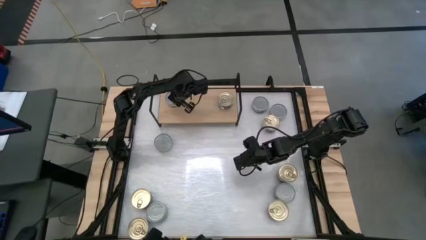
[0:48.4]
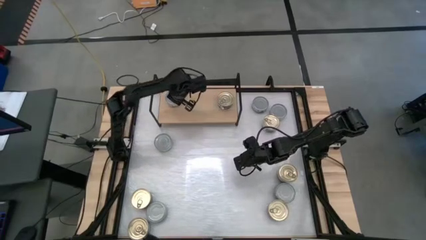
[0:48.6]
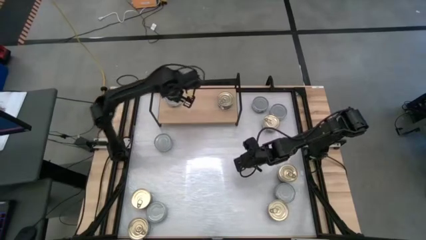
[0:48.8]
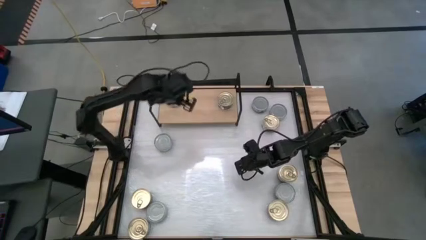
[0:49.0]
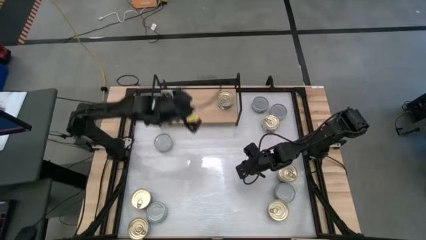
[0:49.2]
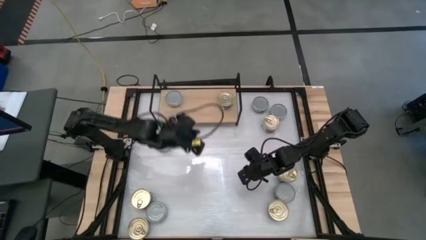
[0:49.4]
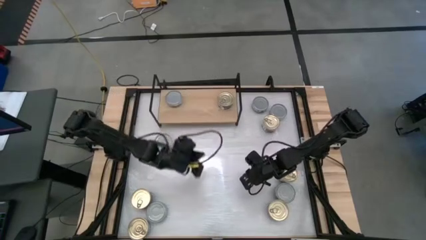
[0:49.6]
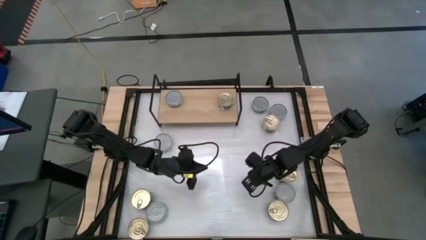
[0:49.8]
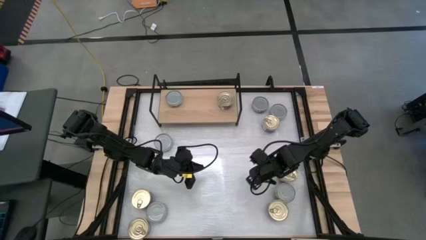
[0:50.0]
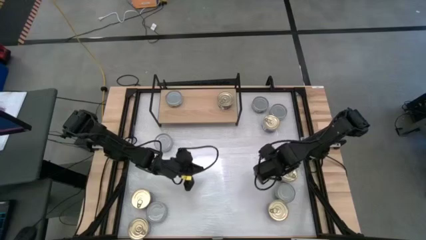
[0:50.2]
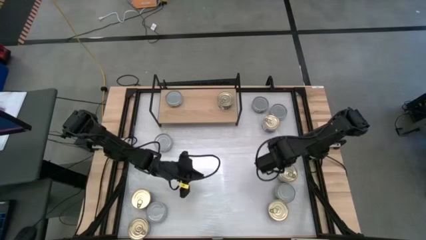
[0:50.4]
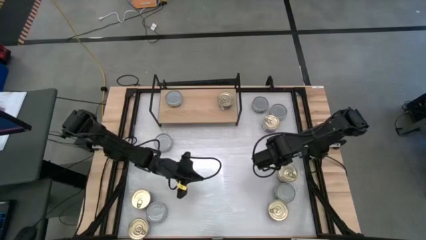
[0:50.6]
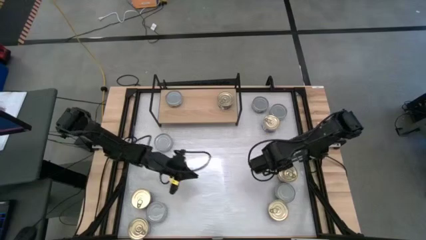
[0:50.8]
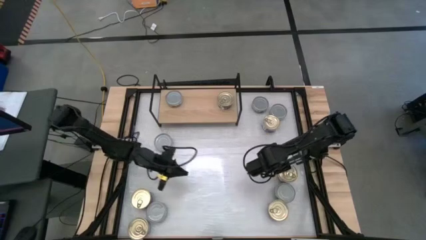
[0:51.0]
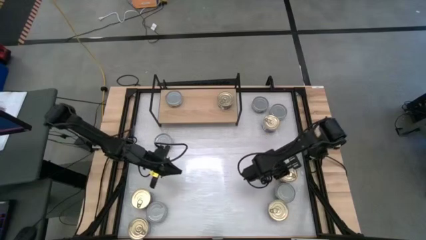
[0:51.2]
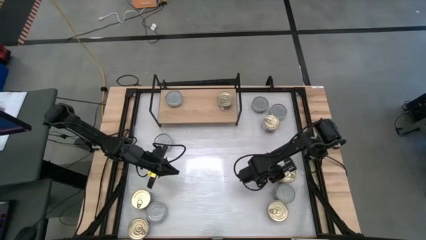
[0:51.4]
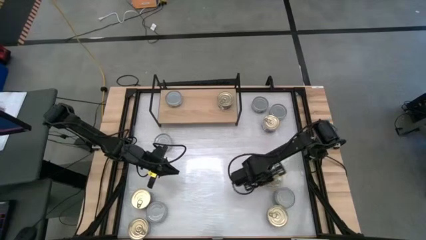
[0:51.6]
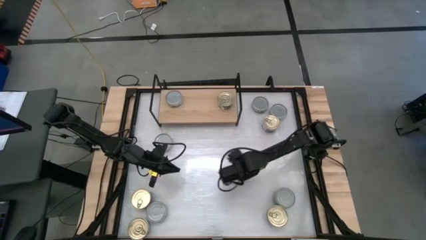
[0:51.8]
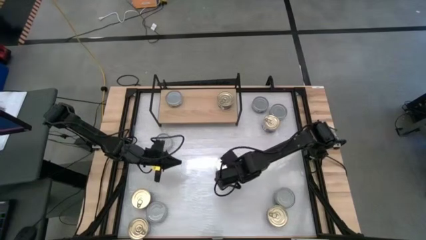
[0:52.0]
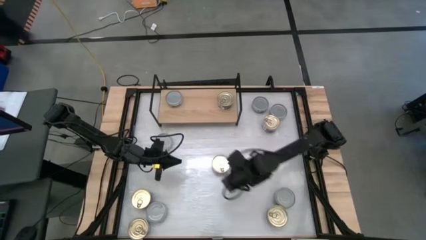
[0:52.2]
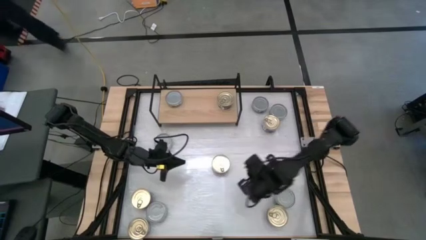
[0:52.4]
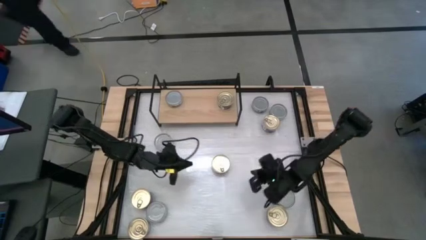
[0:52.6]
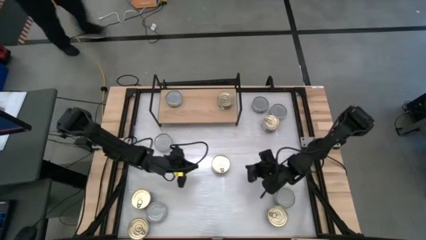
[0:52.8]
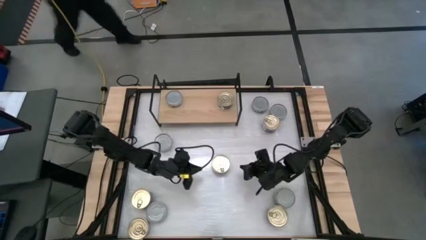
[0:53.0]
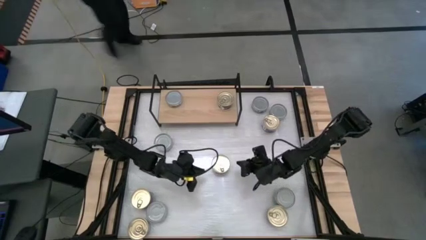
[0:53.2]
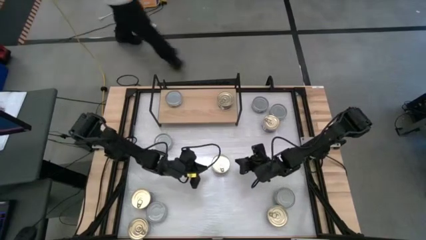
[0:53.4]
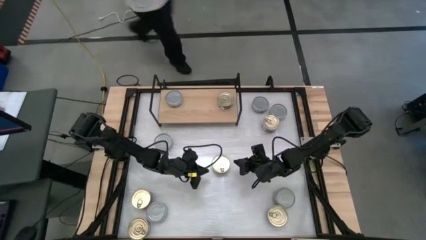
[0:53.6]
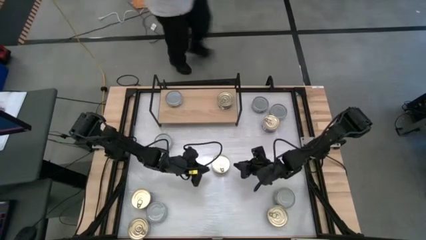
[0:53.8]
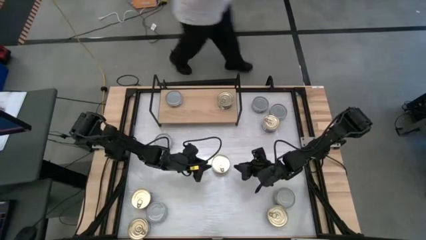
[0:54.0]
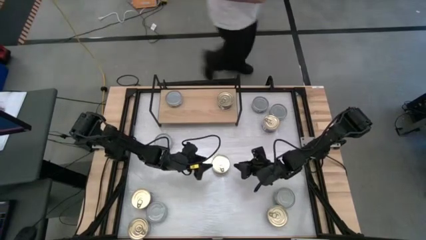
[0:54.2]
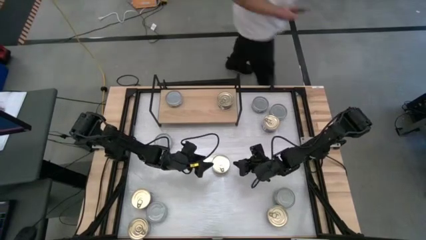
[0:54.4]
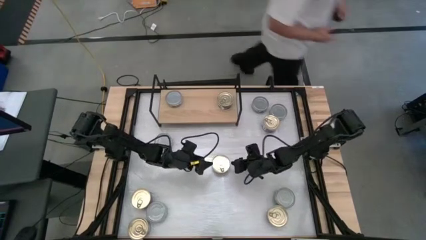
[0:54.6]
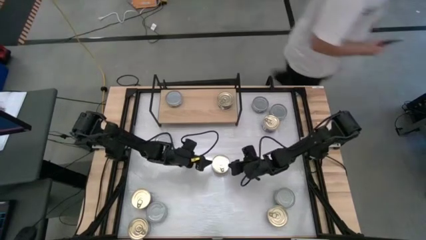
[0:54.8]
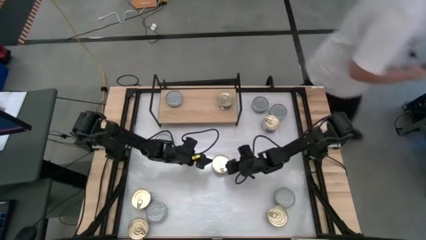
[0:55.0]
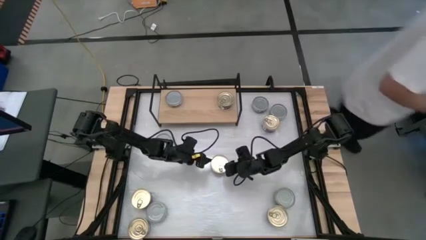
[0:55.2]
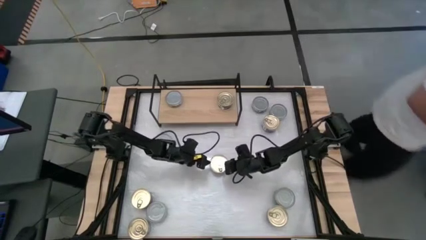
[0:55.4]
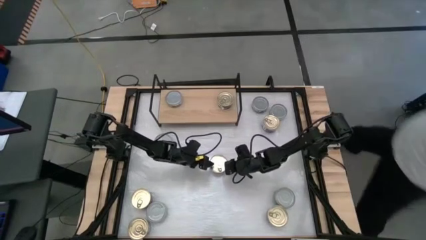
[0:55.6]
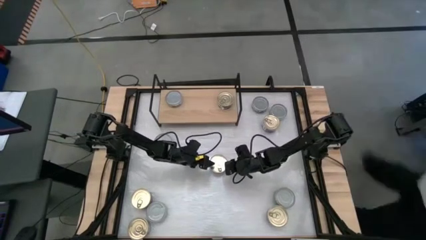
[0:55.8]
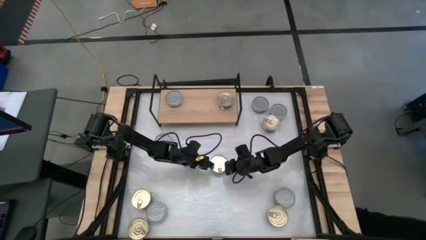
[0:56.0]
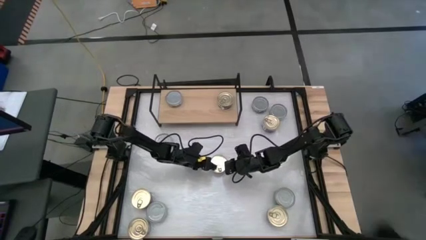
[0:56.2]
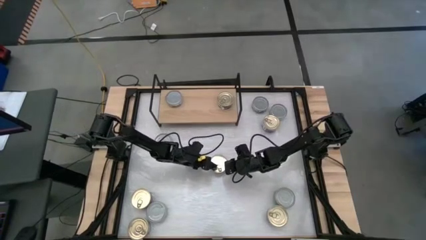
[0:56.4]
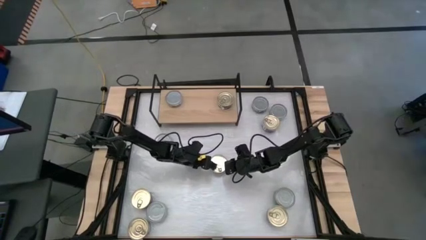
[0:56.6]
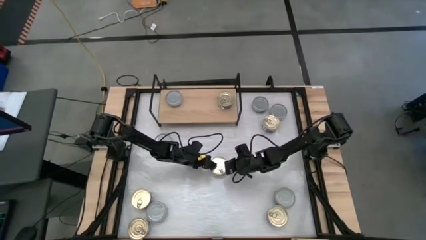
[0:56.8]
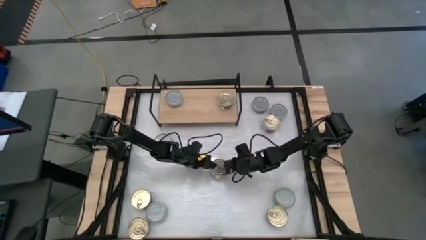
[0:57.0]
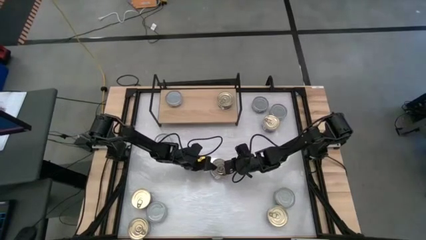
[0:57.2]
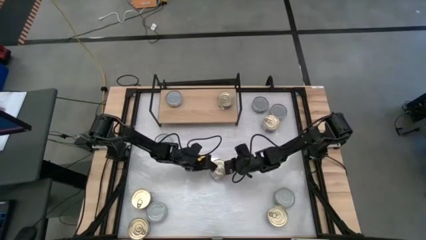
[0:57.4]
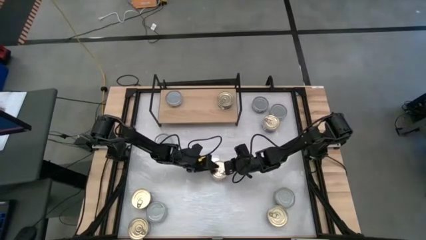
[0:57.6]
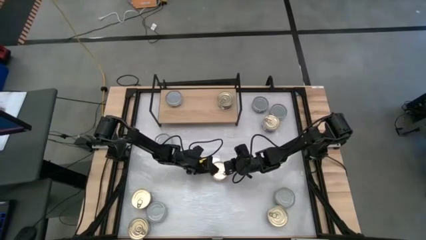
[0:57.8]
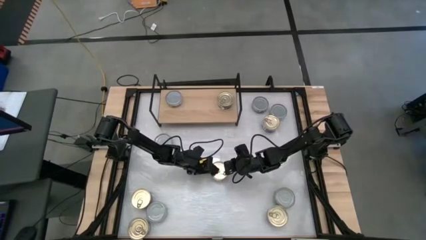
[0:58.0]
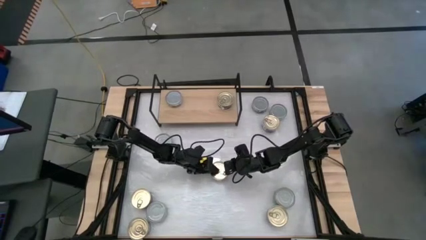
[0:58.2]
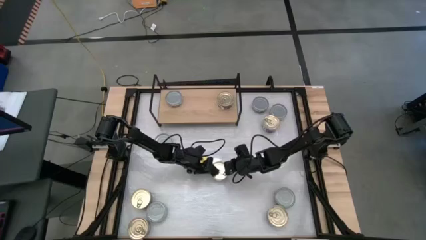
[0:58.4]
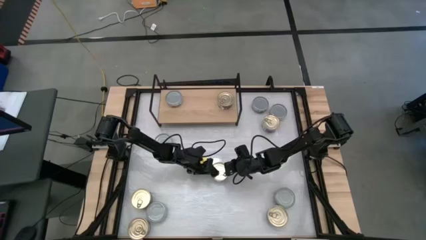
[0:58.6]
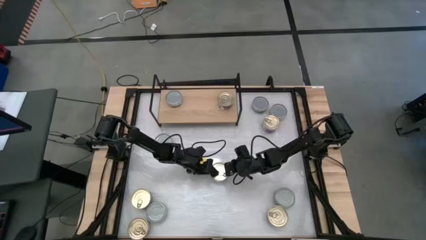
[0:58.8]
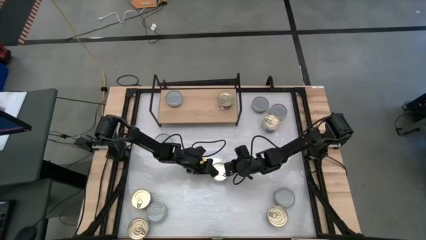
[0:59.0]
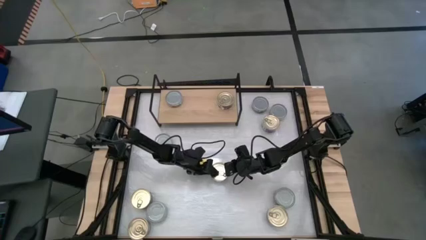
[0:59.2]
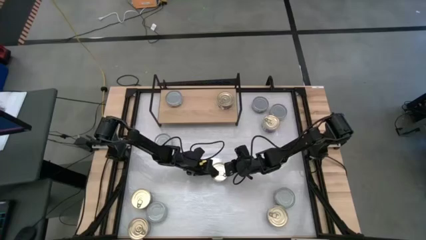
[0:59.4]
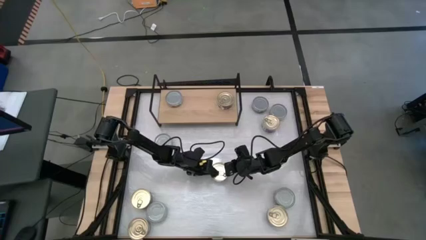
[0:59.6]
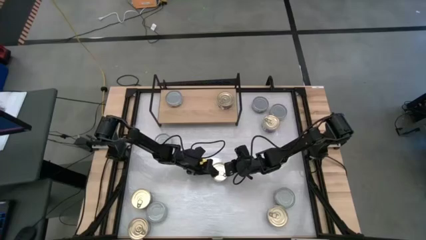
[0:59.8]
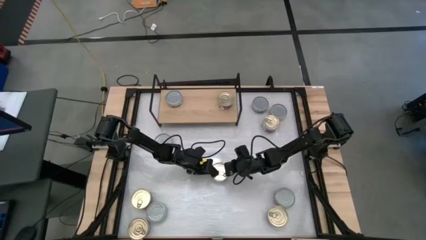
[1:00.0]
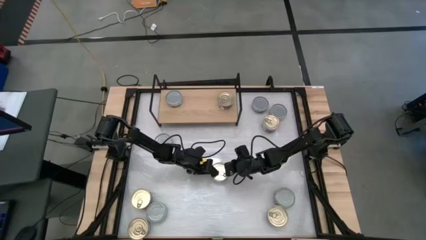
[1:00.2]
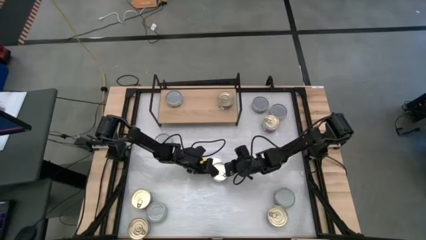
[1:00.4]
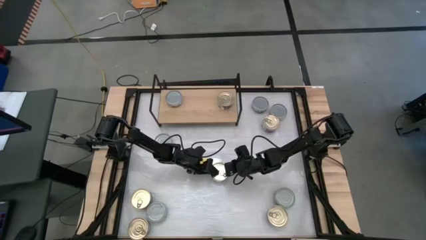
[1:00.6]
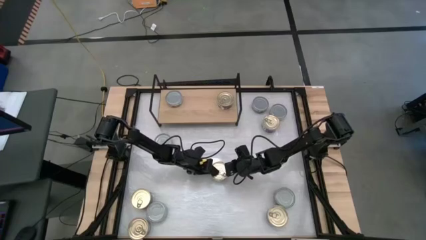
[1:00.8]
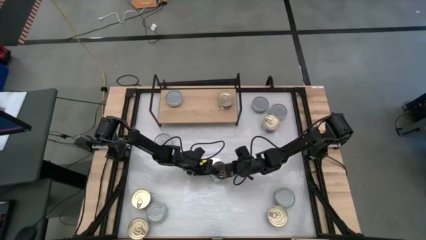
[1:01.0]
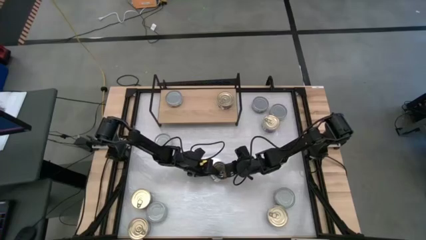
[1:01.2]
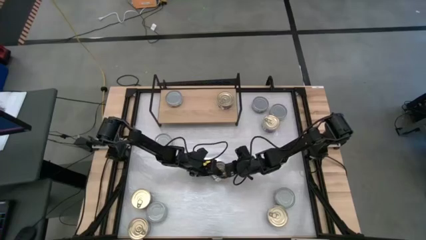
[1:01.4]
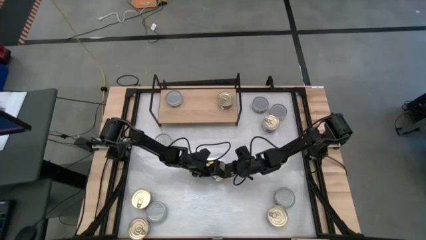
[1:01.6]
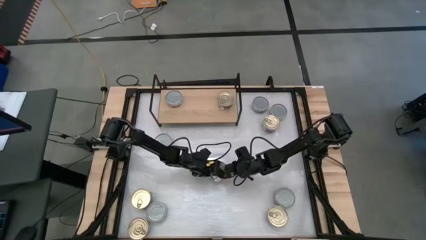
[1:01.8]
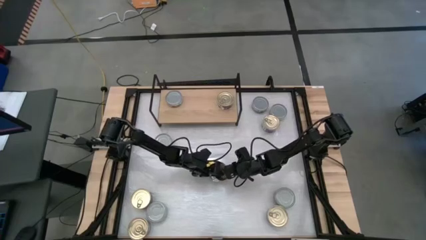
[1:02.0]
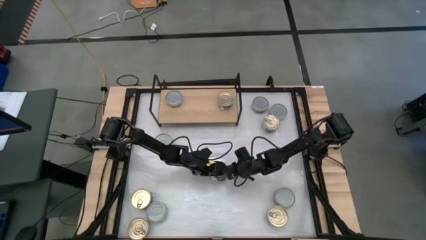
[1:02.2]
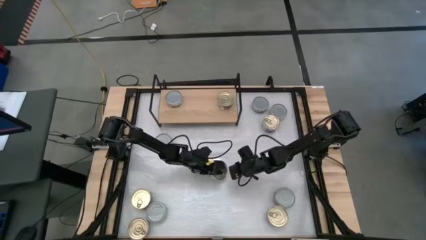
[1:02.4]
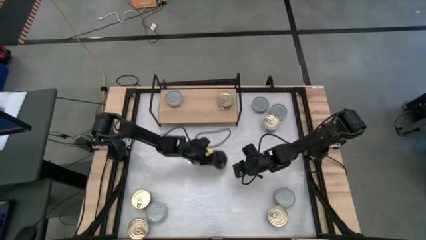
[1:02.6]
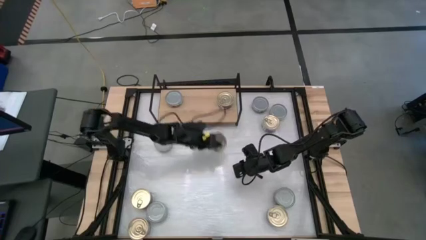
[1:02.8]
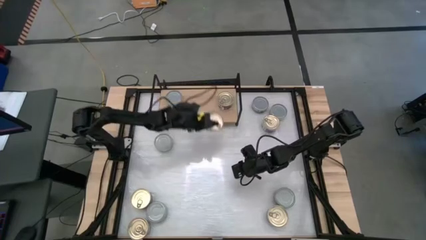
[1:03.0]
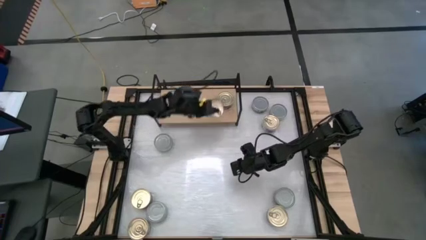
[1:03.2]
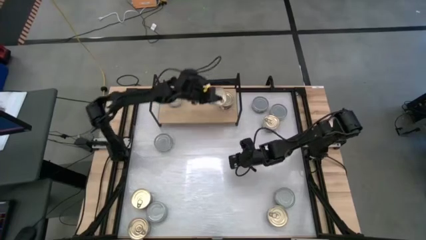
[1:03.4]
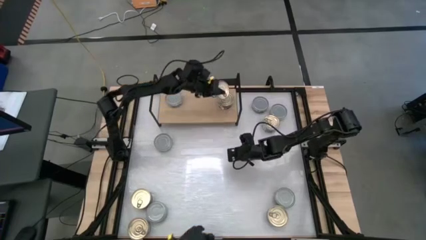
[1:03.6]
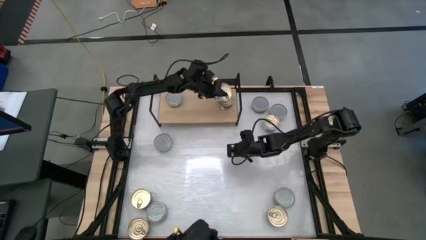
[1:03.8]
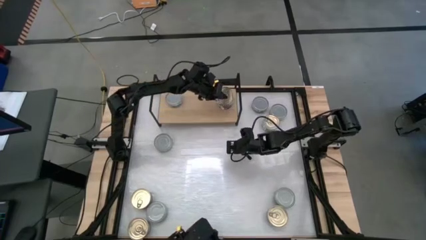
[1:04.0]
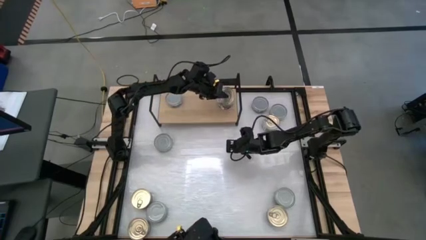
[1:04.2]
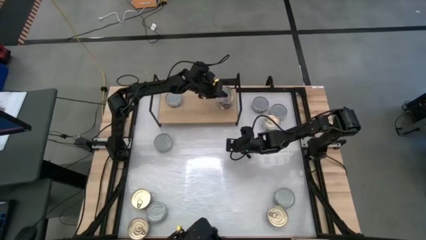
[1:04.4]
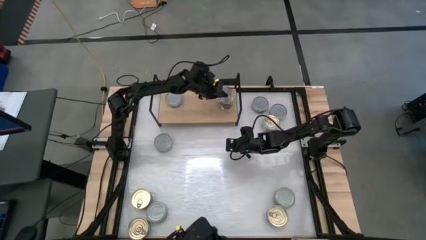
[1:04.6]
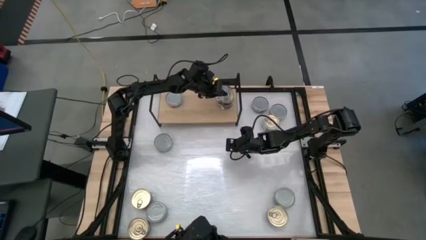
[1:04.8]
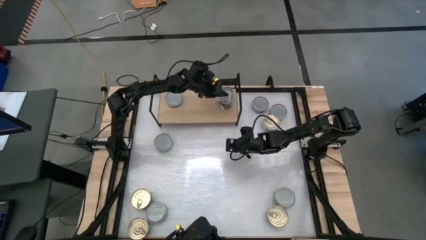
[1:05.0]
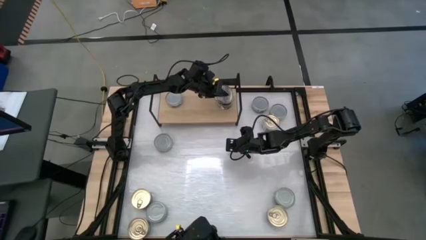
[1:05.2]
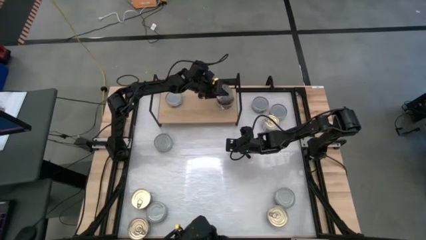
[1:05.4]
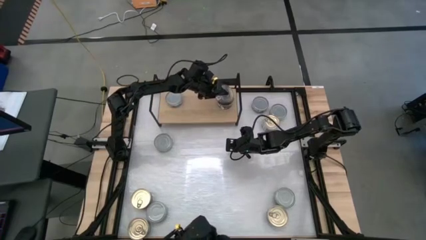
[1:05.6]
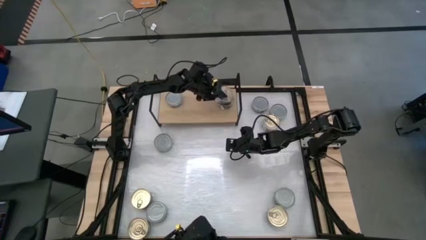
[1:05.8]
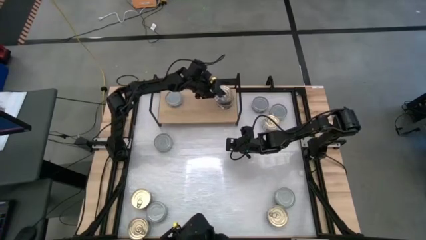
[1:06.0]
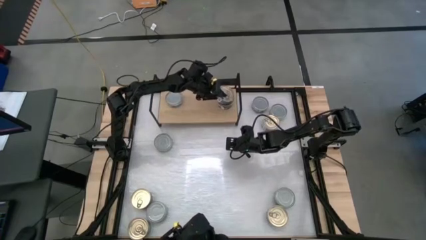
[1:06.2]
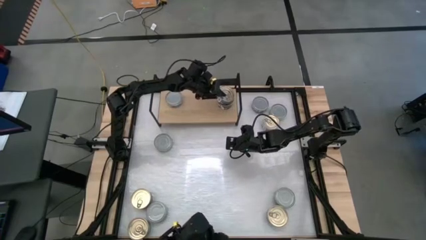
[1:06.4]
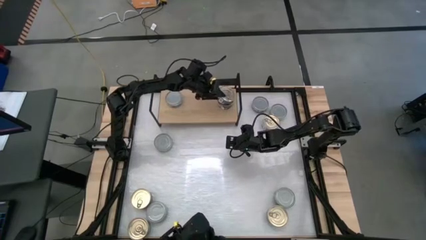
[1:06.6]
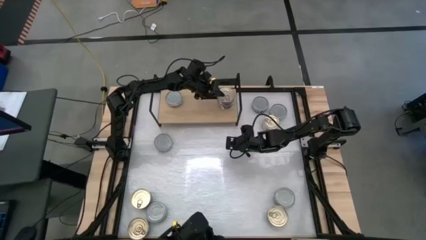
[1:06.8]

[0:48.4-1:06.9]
Task: Stack canned seafood by type on shelf
Stack the blue tuna can on top of the blue tuna can on the shelf
